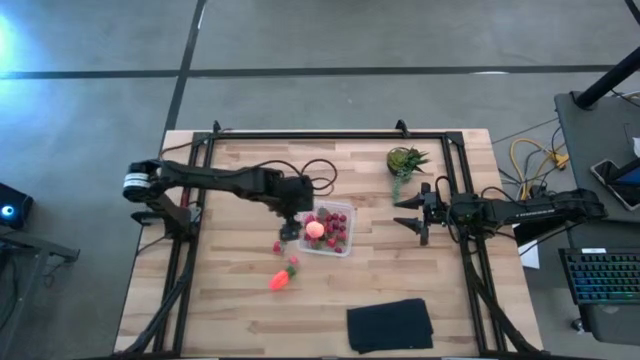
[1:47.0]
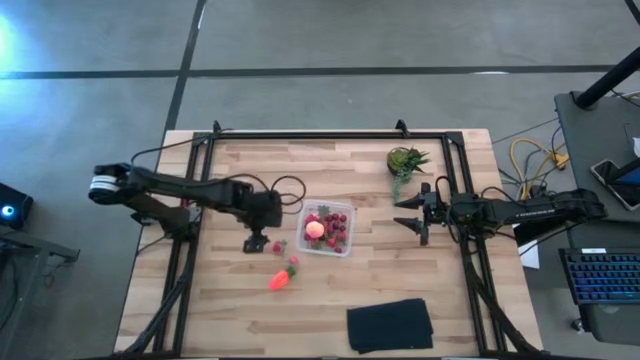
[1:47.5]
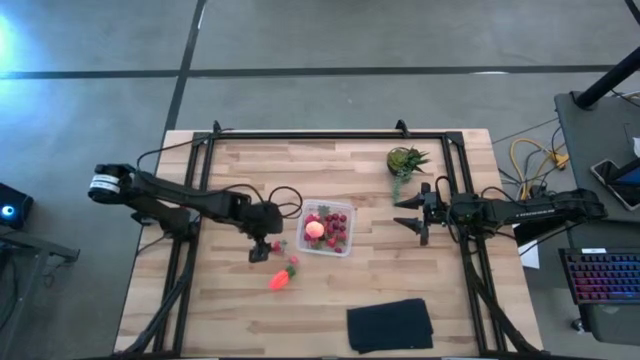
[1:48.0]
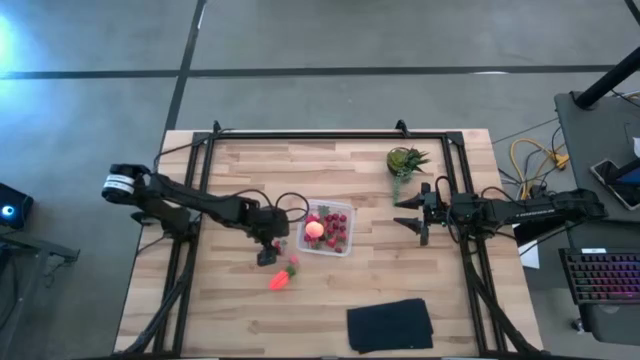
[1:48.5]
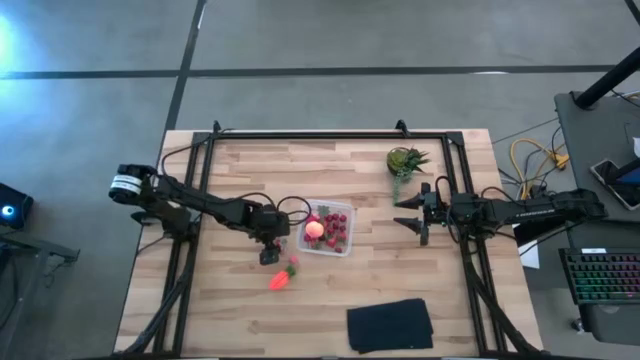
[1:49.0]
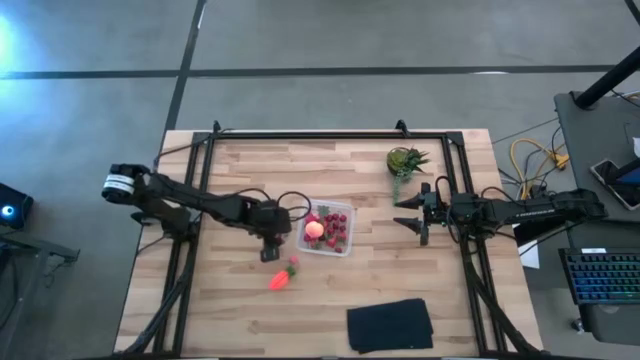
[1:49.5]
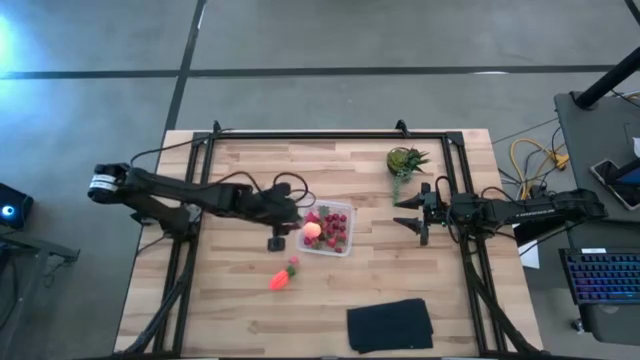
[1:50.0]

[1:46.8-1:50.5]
Task: Pick and placing Produce into tupperware
Put the red strawberry into the transparent bin

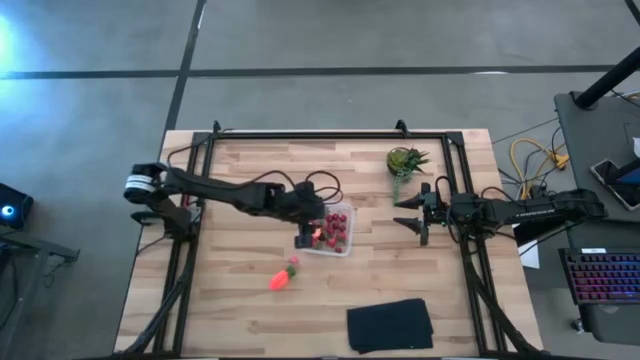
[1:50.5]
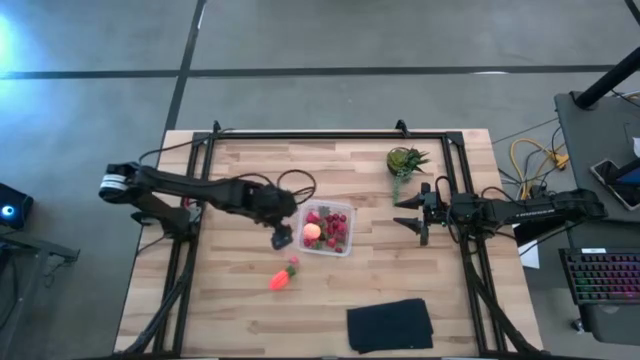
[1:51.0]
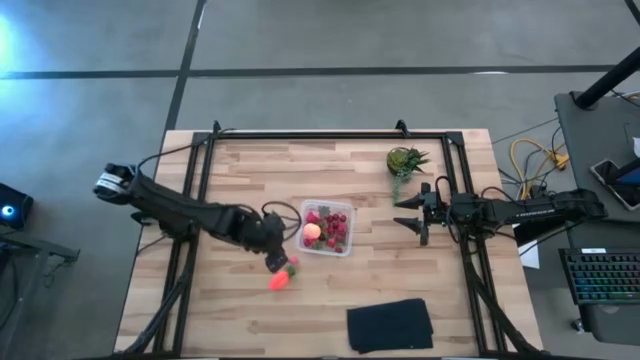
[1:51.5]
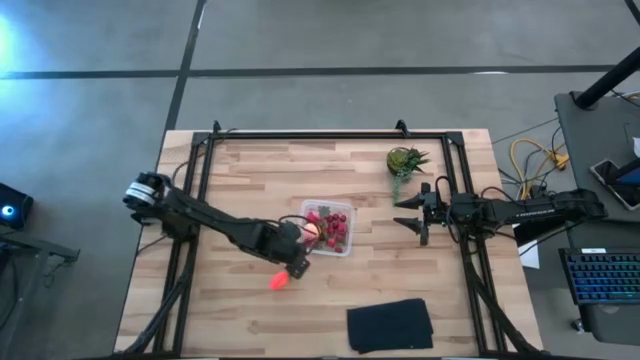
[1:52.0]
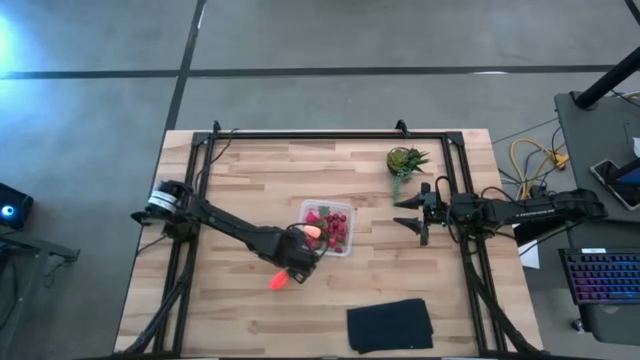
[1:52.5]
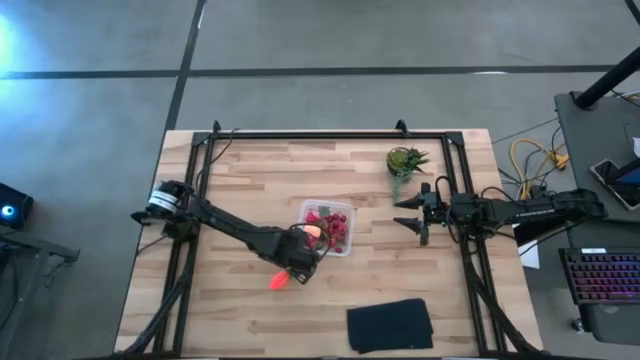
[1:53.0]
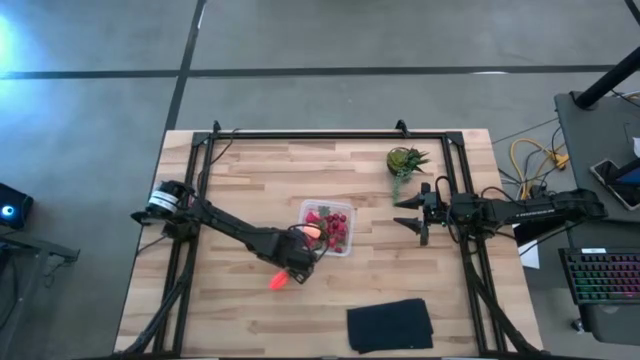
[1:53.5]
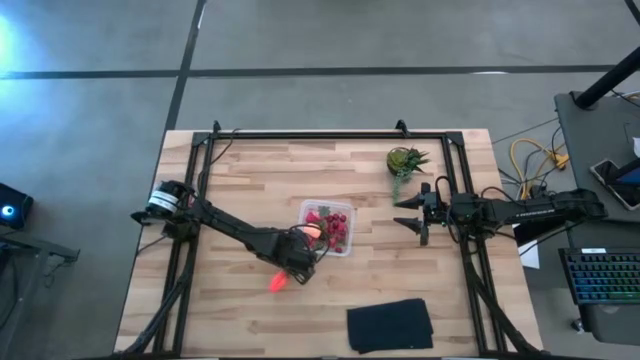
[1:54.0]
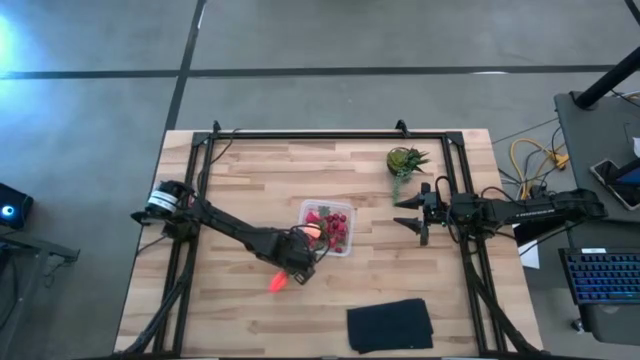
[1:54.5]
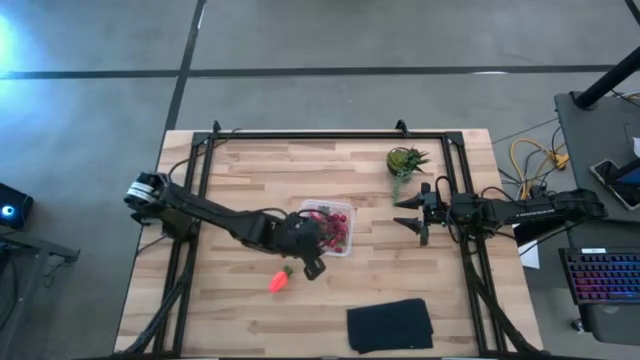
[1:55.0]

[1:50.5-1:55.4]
Put the pink peach into the transparent bin

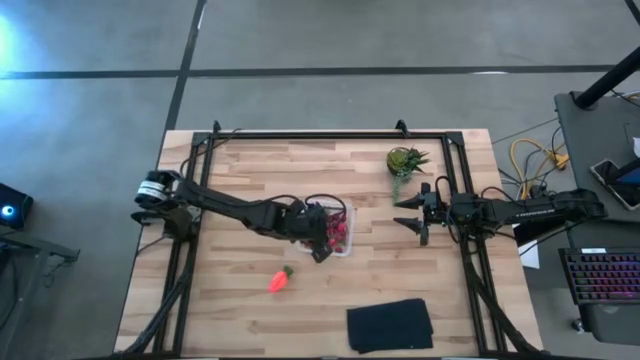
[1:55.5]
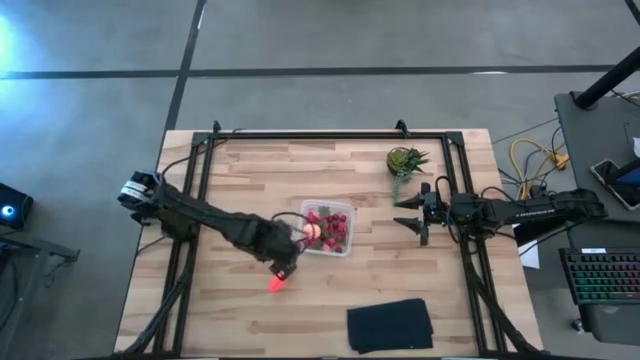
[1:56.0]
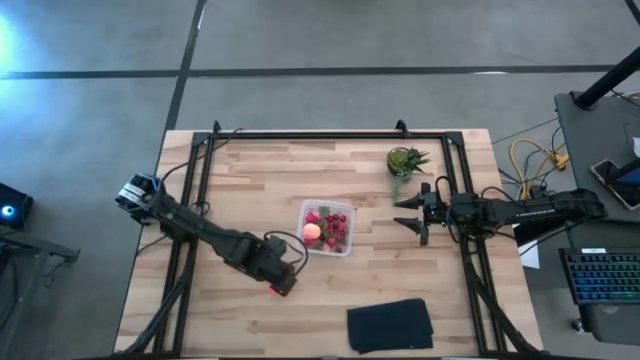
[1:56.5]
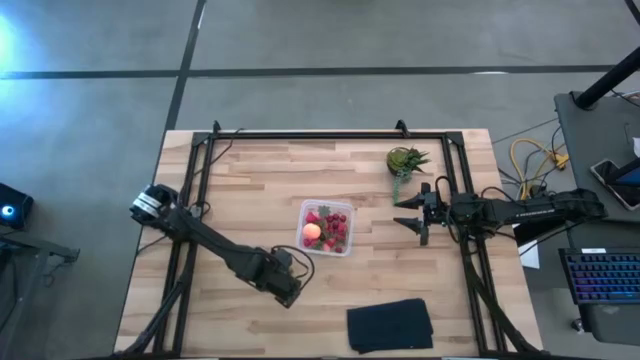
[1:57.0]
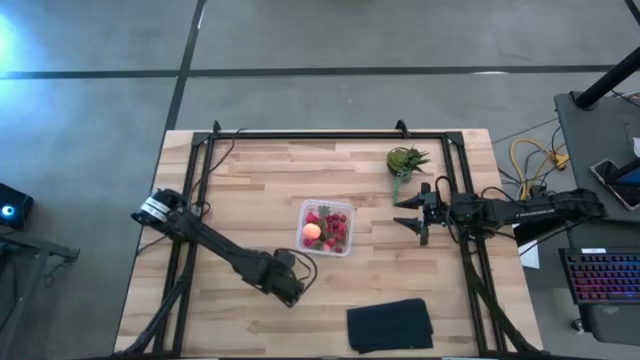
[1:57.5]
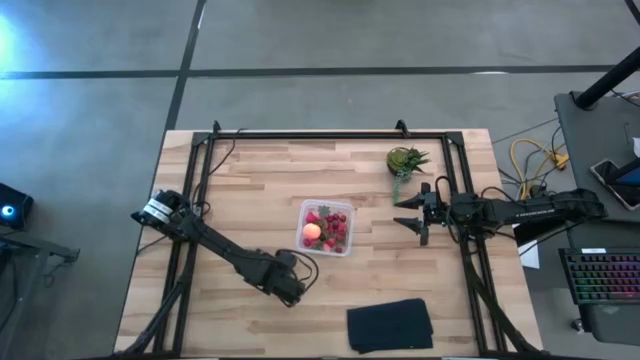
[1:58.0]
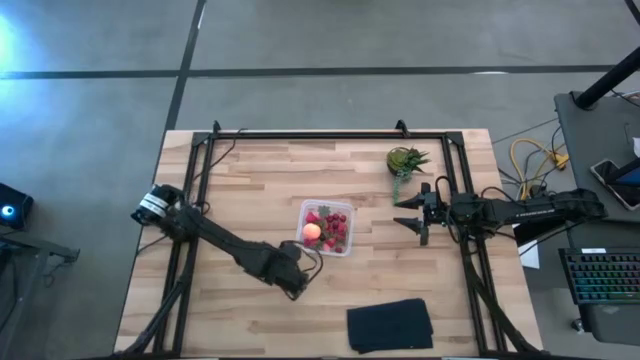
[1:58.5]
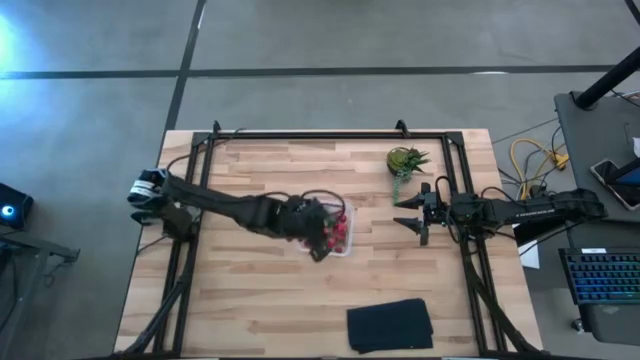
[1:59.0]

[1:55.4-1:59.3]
Put the orange carrot into the transparent bin

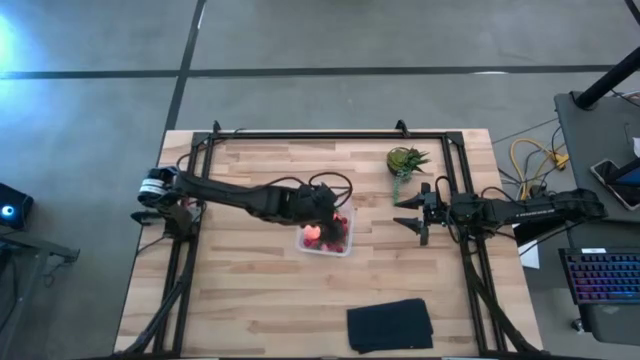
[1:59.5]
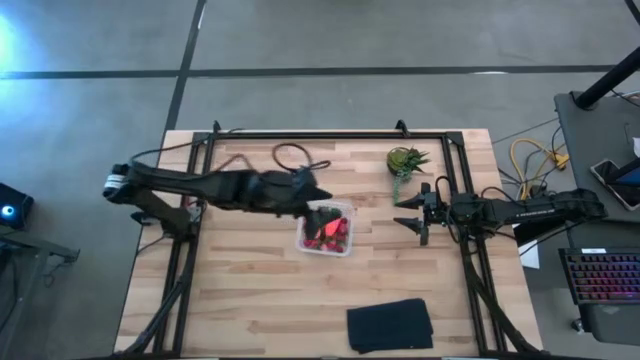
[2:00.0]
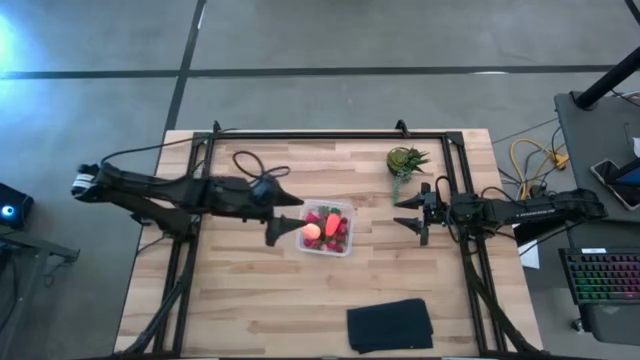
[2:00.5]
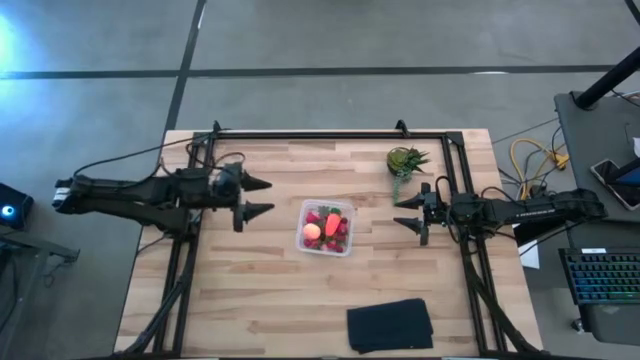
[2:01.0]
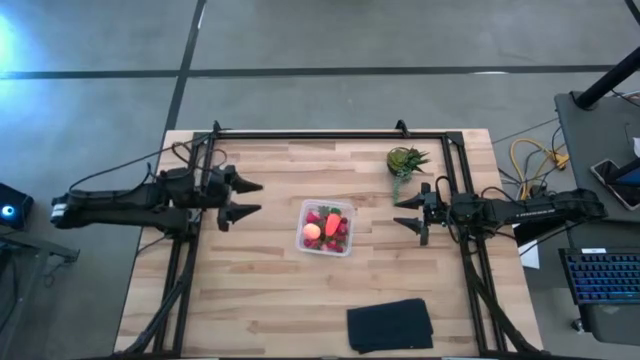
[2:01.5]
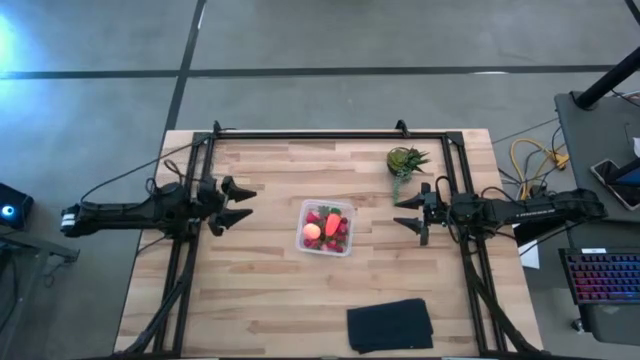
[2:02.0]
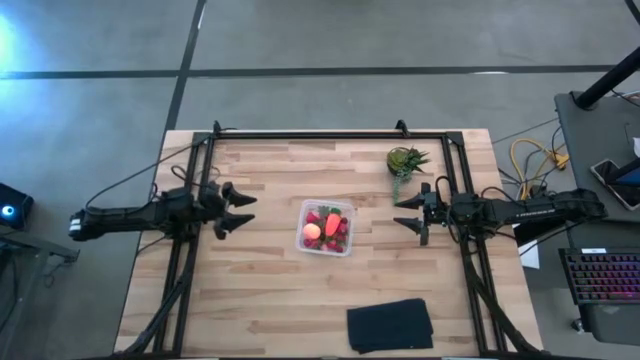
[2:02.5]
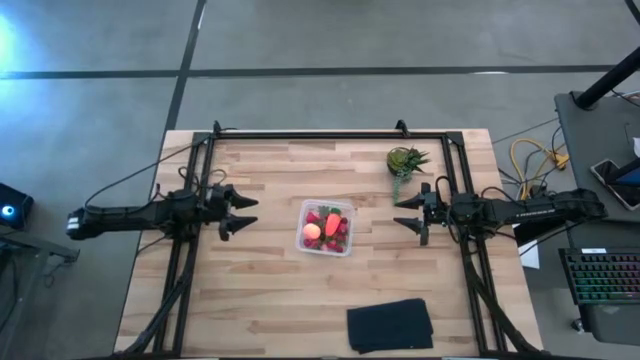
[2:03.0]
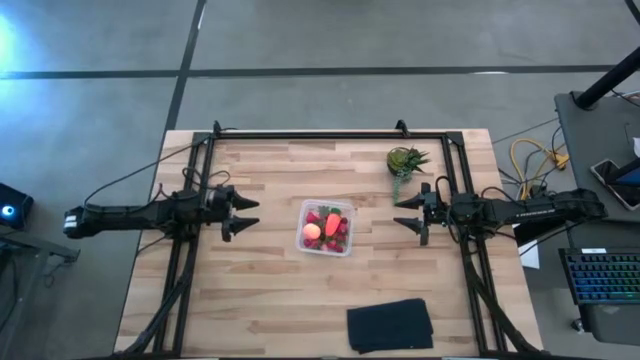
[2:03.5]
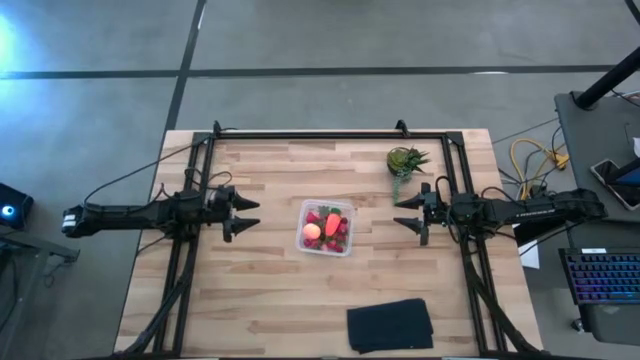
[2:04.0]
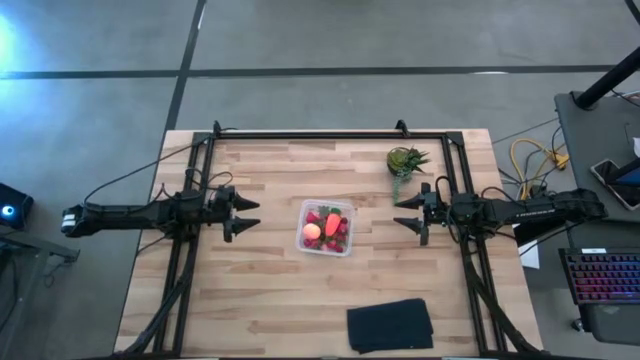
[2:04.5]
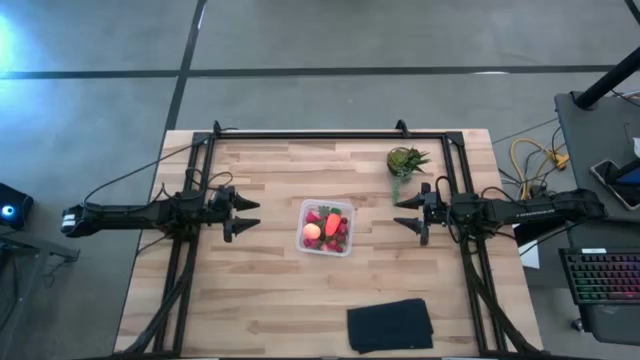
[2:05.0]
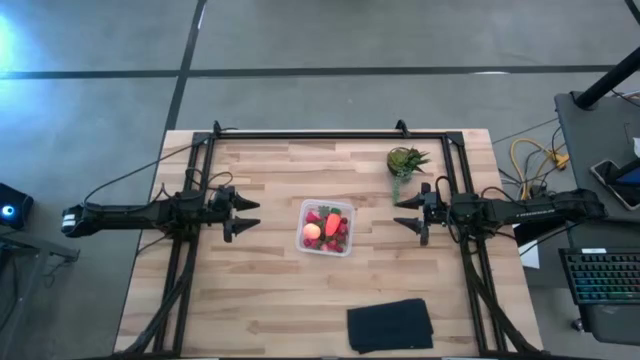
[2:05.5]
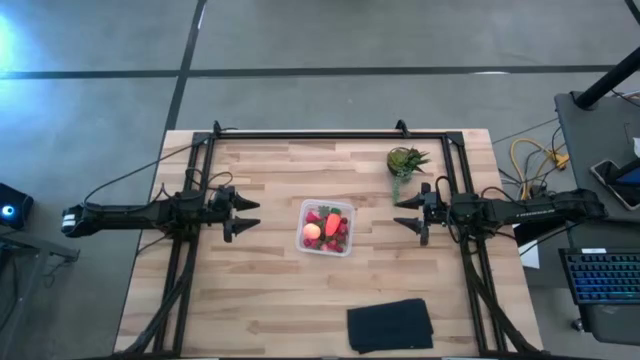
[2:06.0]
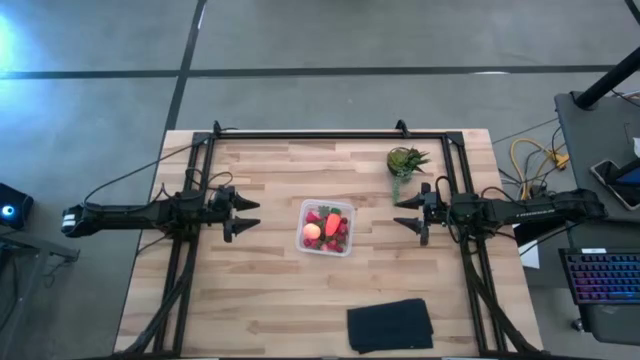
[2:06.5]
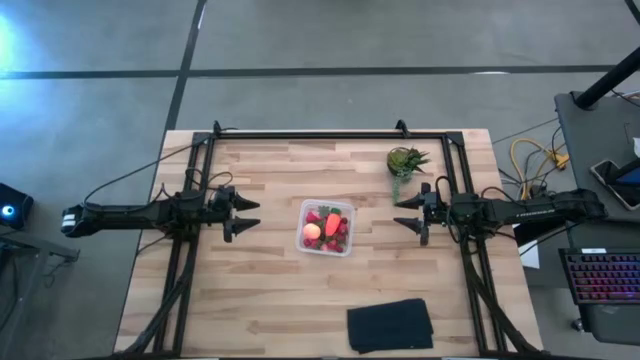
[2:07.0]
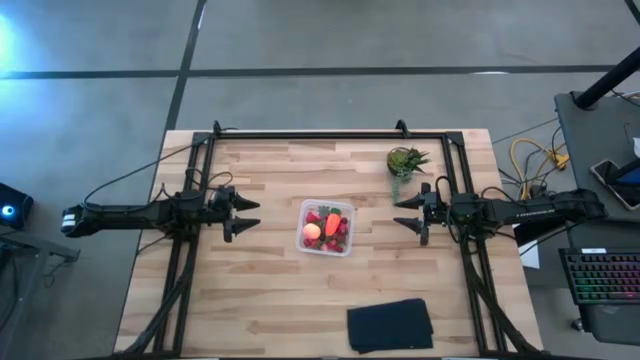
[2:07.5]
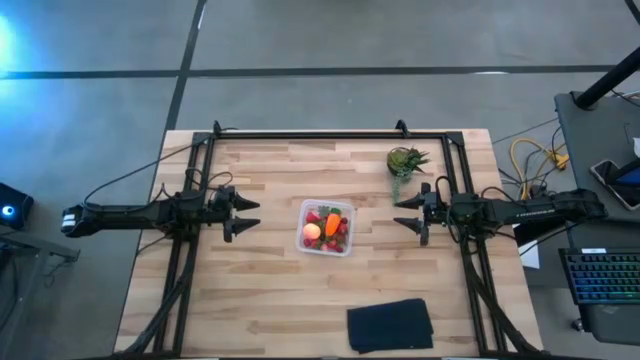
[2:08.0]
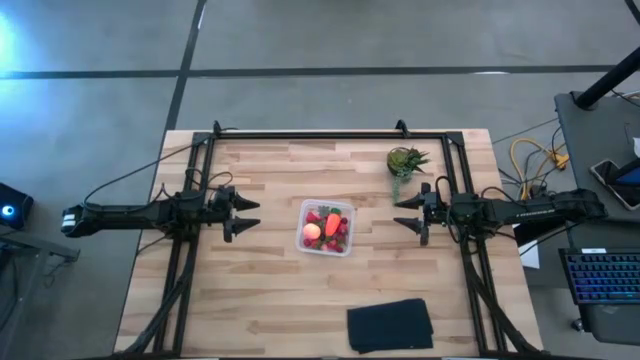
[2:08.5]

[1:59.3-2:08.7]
Return to Home Position
